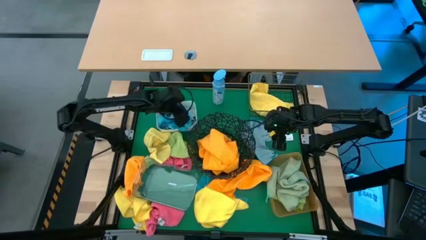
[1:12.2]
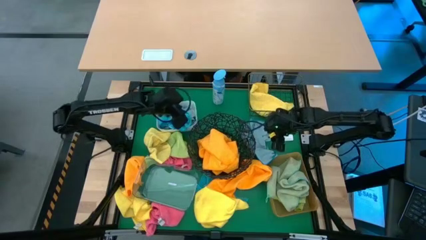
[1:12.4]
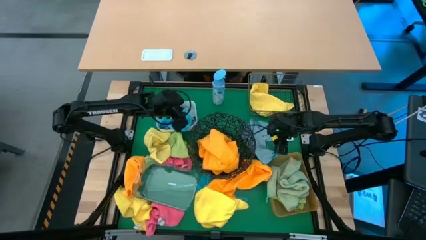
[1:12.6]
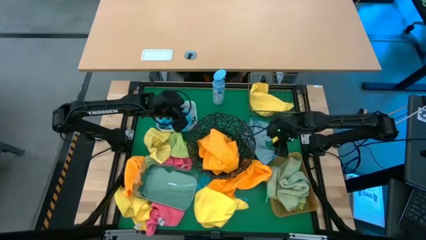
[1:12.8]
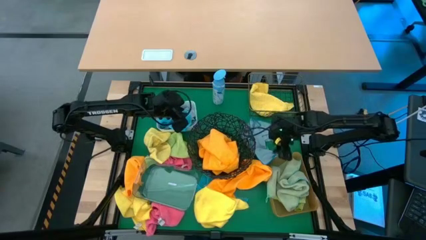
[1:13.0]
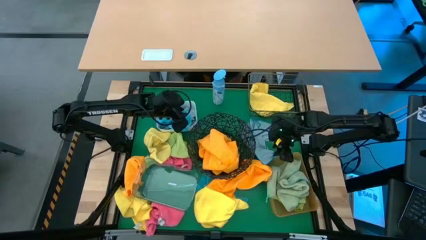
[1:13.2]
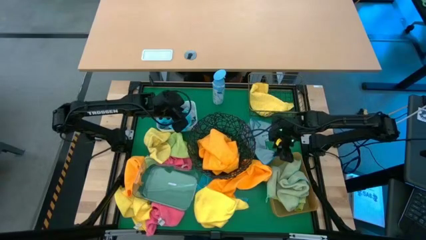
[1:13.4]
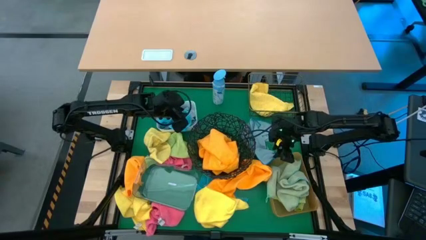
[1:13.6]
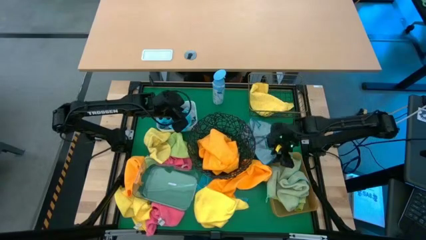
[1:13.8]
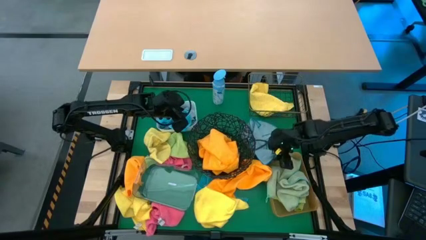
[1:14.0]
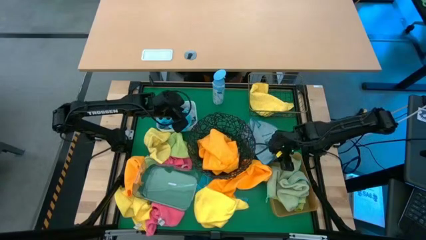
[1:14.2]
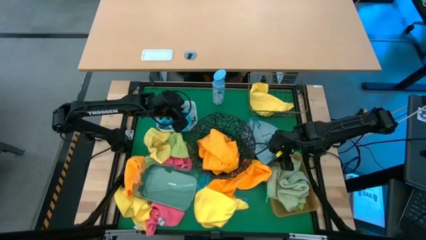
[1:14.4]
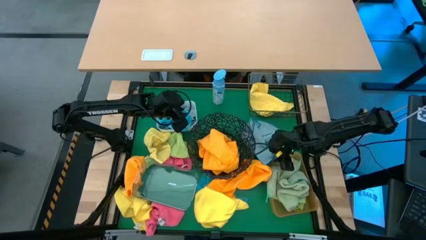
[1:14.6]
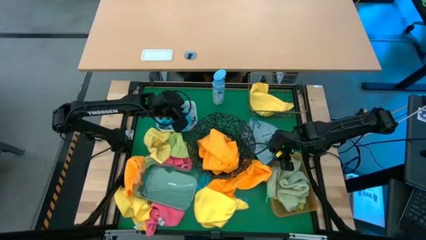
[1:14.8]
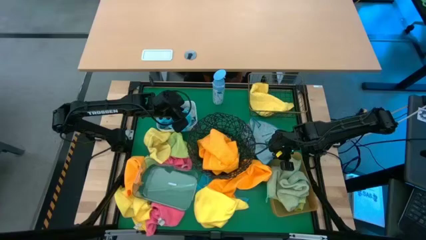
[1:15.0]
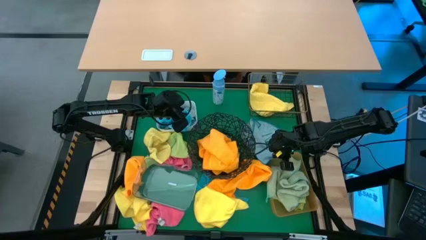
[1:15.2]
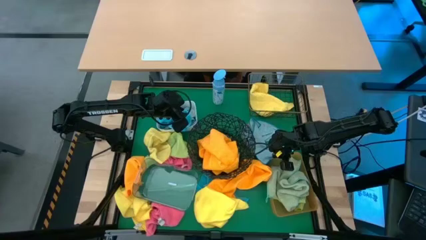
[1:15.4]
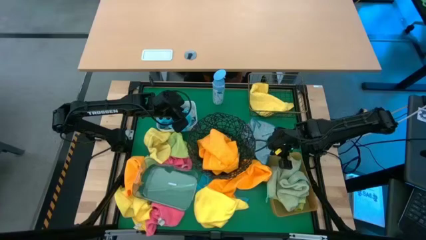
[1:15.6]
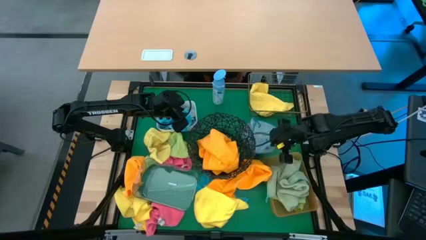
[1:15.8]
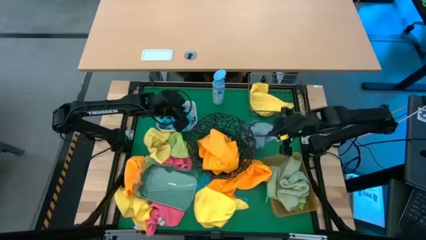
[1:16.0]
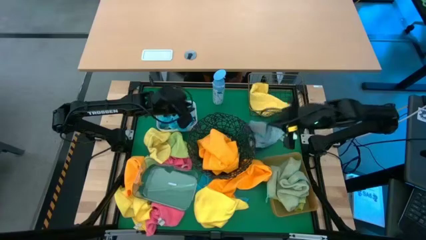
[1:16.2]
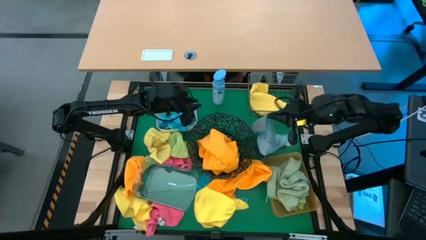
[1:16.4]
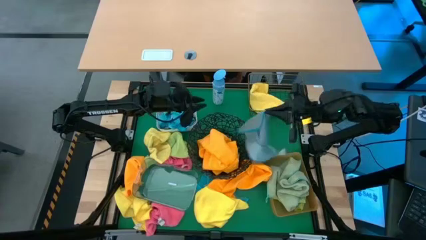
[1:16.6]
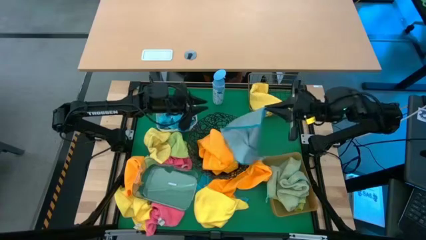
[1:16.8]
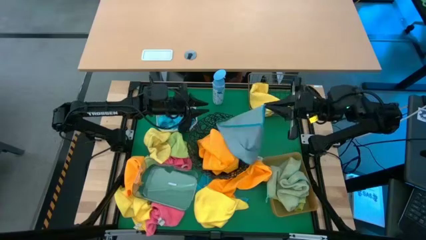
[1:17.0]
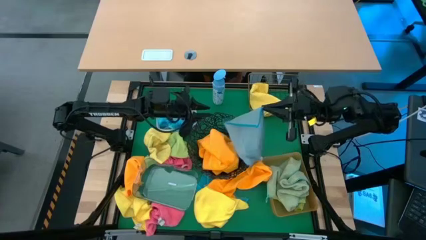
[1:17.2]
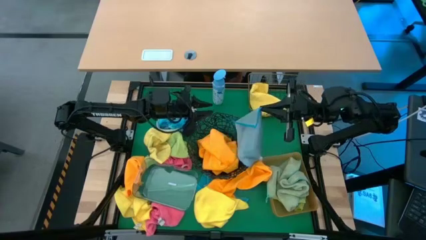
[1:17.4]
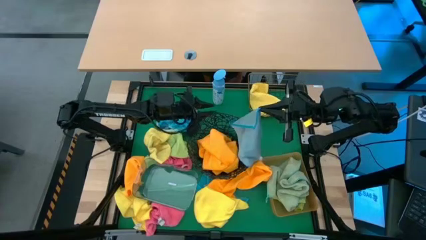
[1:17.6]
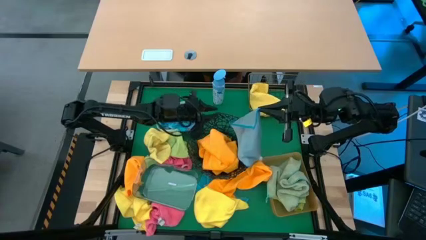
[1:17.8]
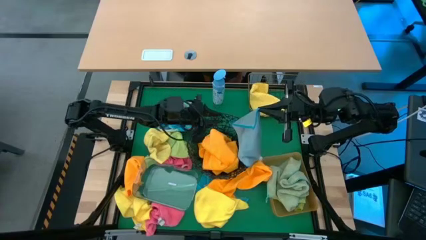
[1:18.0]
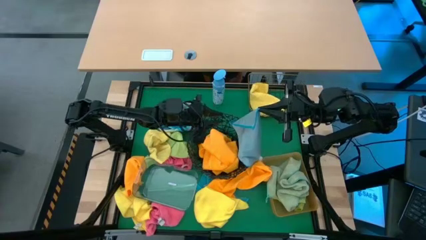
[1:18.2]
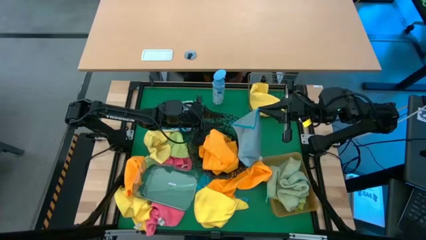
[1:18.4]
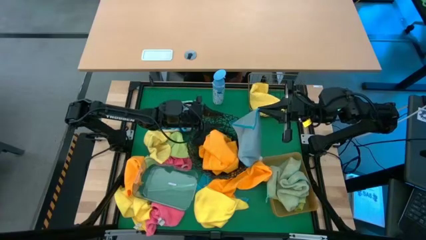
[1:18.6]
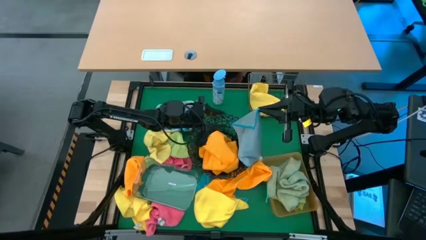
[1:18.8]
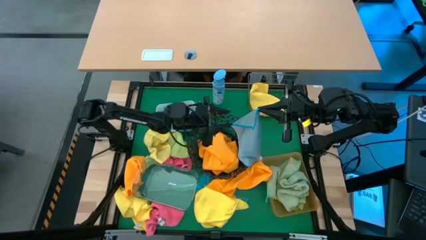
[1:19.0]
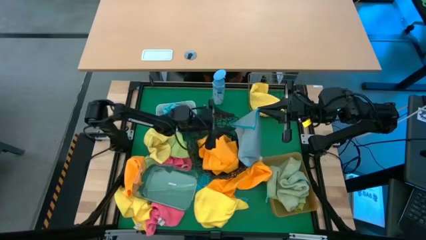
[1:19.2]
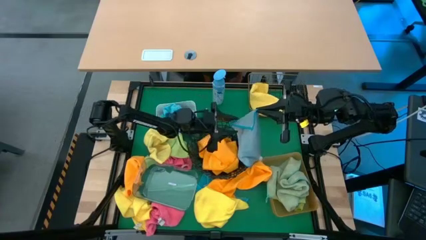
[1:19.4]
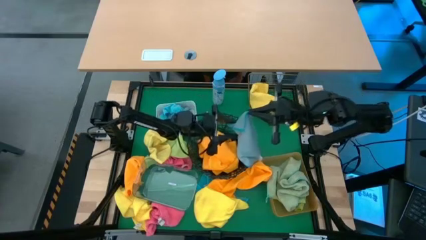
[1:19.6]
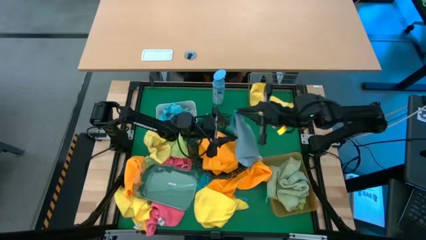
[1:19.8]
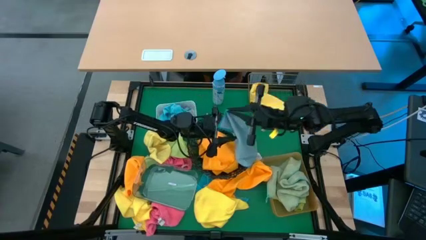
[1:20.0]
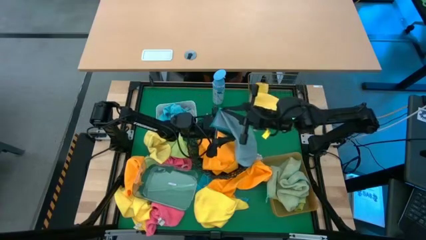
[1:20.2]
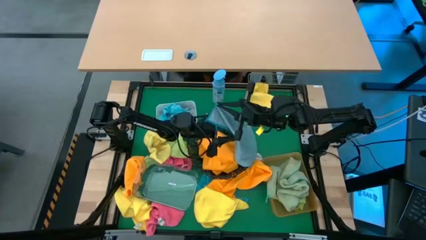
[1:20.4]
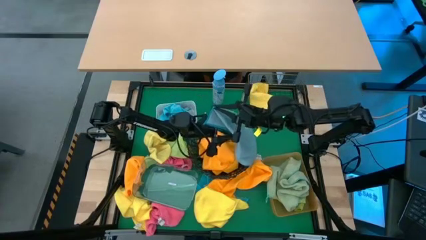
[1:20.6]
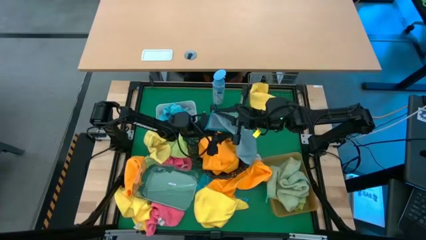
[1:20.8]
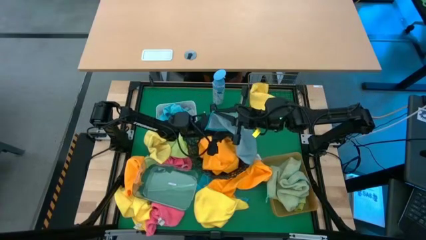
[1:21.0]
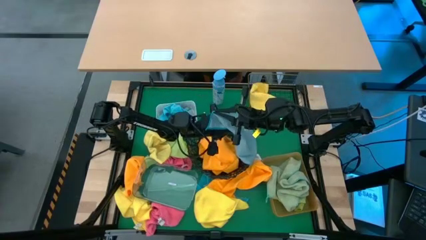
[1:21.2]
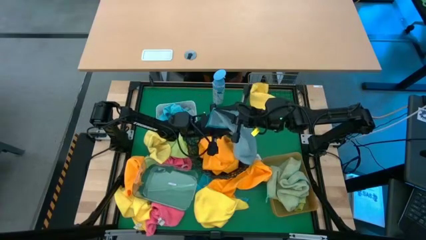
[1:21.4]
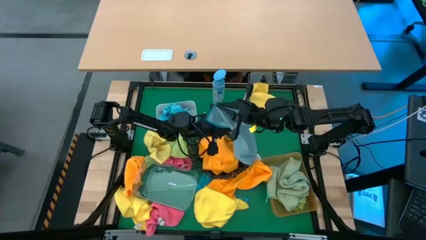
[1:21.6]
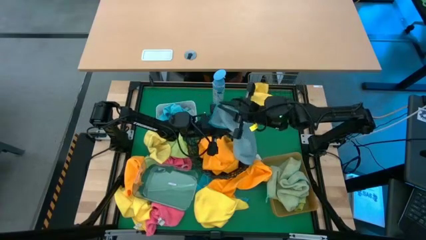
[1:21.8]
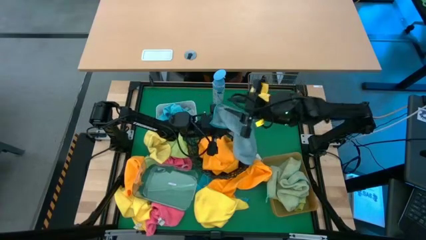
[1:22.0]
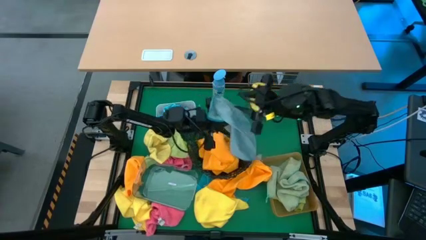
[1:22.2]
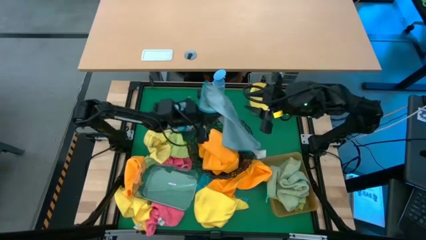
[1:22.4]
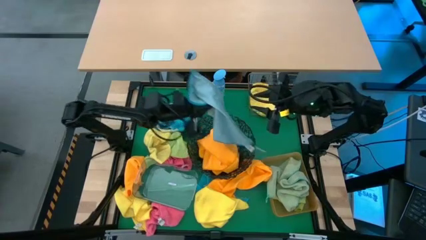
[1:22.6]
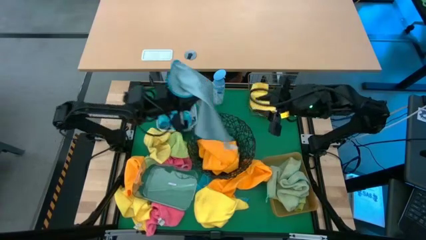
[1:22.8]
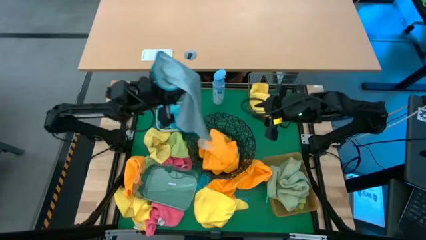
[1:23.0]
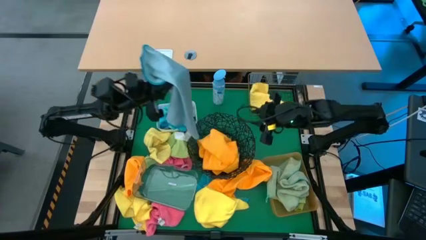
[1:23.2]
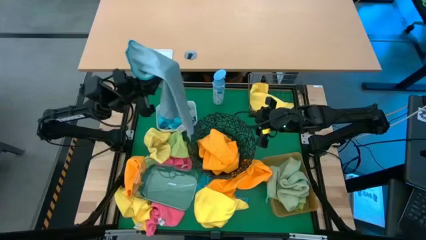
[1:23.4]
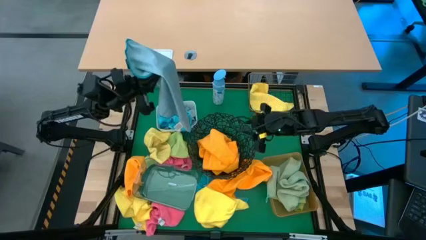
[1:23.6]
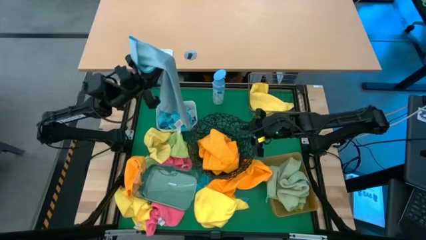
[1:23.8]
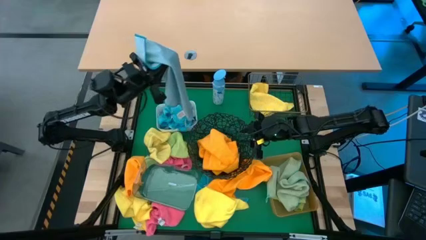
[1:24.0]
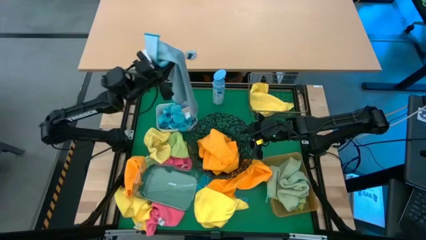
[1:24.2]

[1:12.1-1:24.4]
Task: Sort microfiber towel by color & place in baskets
Put the light blue microfiber towel into the white bin

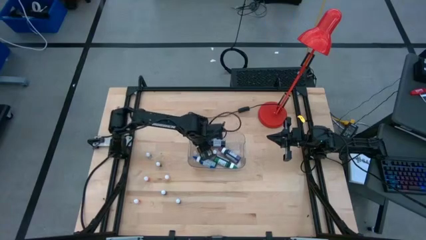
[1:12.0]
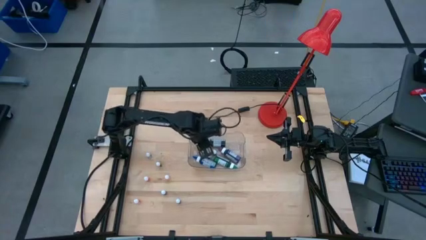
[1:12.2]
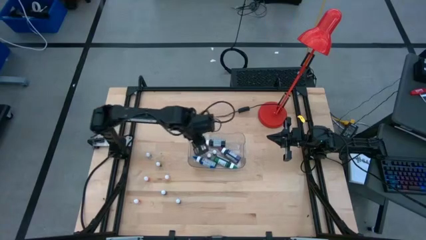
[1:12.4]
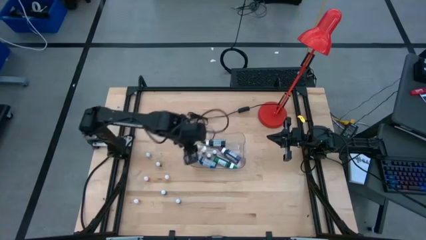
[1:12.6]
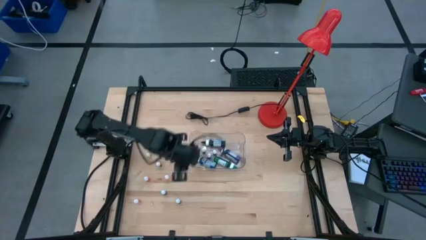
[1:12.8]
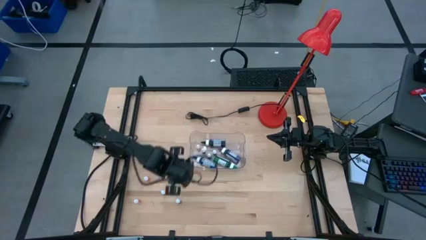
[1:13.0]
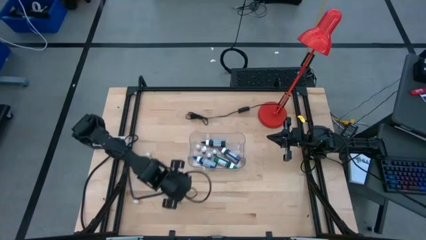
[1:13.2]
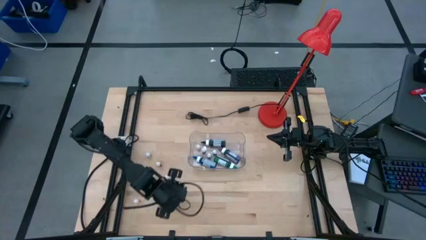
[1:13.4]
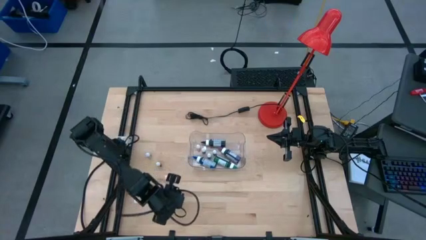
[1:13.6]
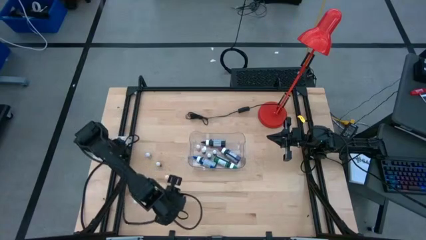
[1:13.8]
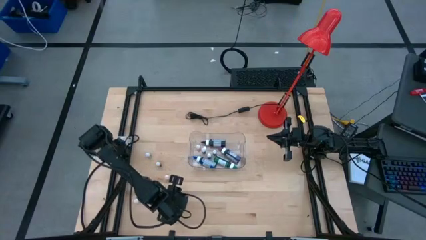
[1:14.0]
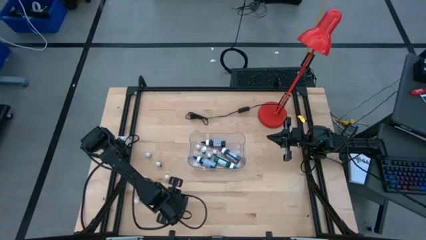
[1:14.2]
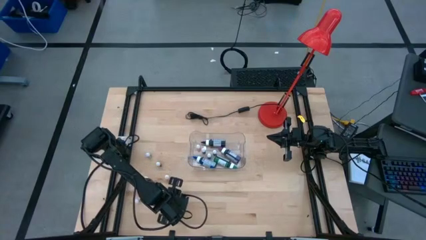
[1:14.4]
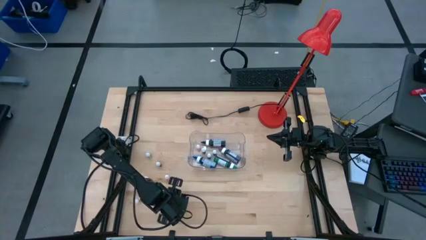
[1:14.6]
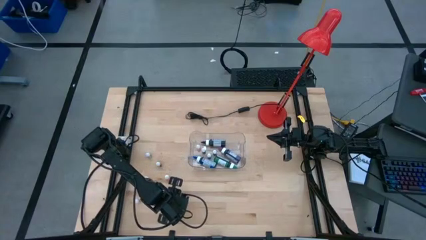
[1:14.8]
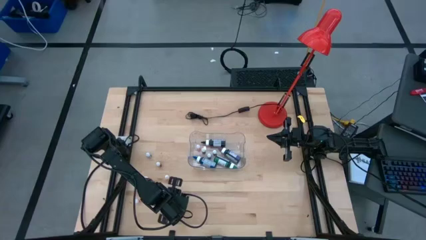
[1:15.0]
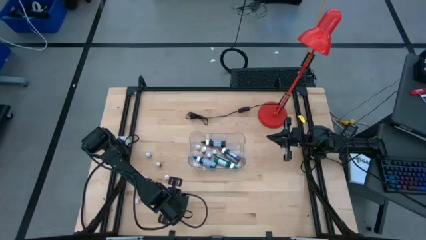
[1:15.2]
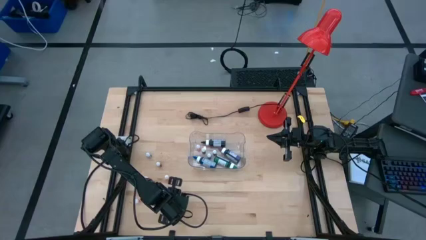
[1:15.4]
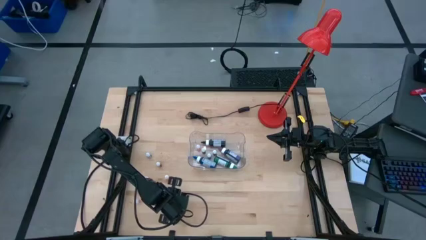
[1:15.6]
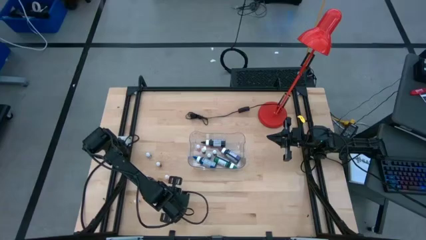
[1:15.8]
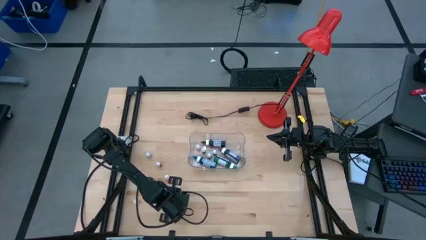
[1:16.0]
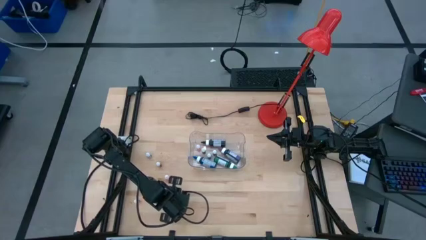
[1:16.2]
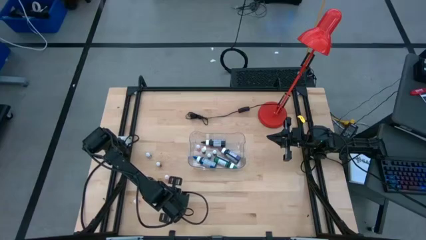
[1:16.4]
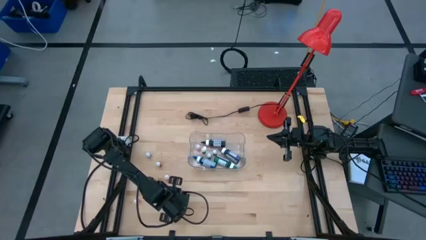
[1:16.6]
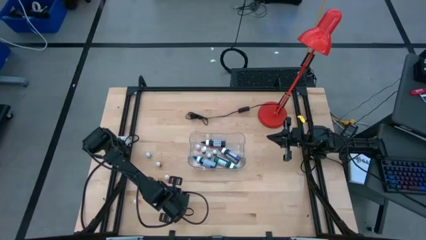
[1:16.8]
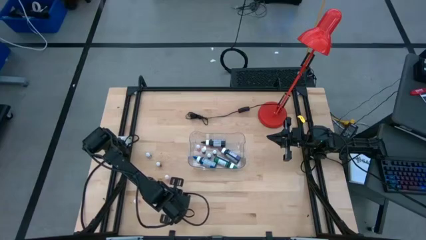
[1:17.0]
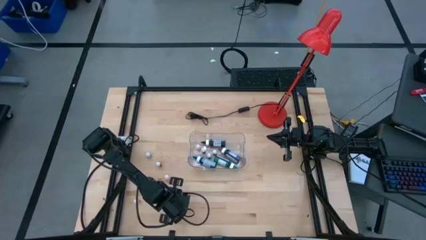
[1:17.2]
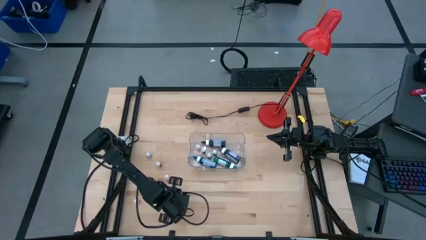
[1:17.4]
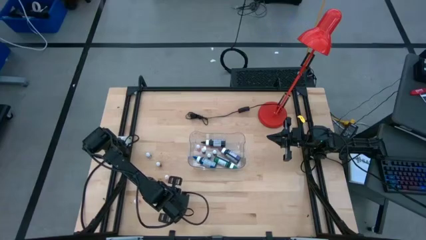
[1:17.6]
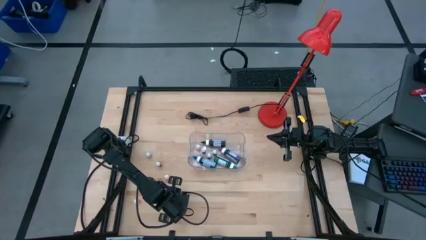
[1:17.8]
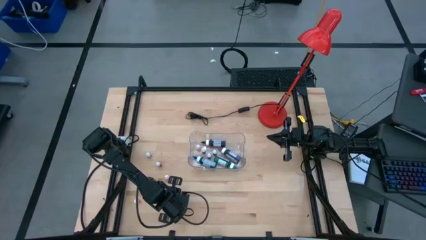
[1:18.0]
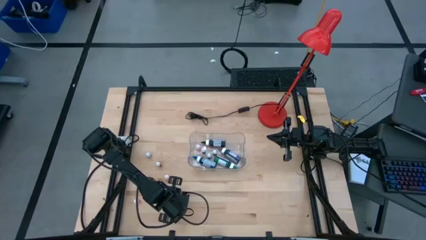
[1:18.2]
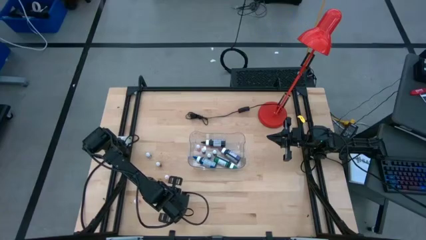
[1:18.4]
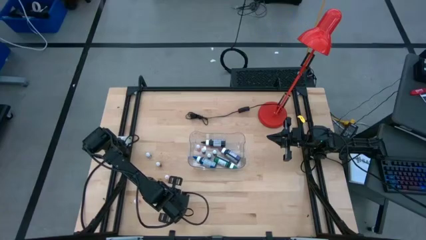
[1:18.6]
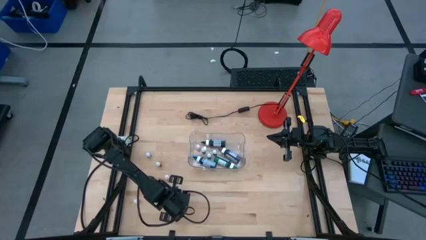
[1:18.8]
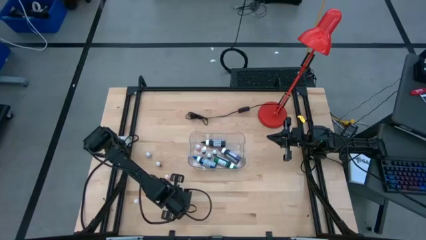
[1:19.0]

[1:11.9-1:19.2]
Task: Pick & Place food coloring
Put the small blue food coloring bottle into the transparent bin
